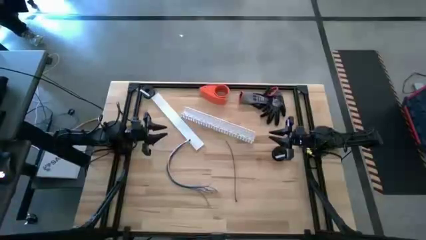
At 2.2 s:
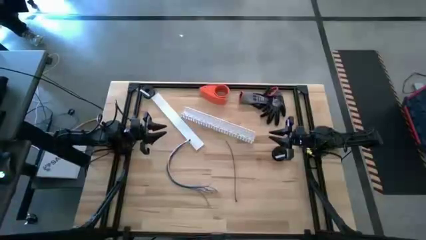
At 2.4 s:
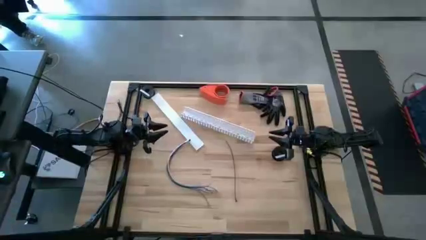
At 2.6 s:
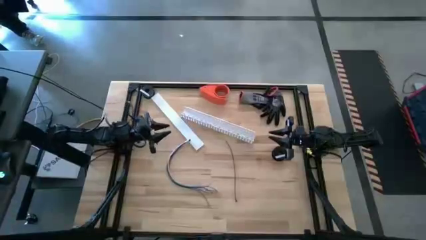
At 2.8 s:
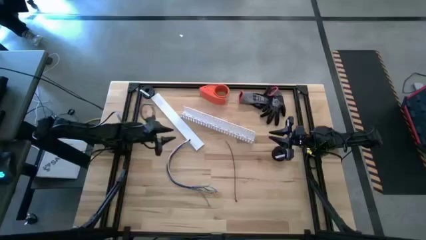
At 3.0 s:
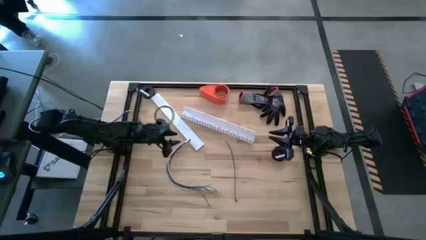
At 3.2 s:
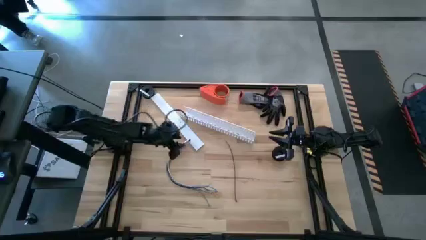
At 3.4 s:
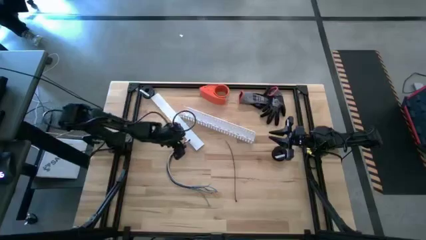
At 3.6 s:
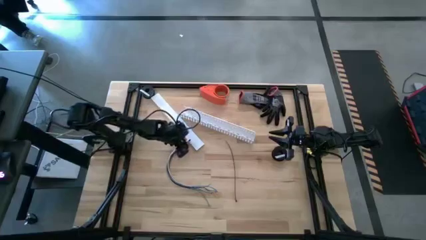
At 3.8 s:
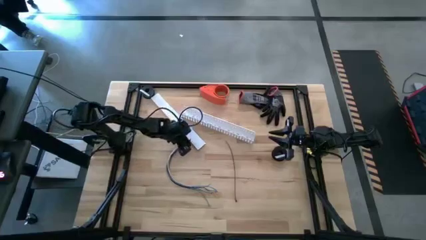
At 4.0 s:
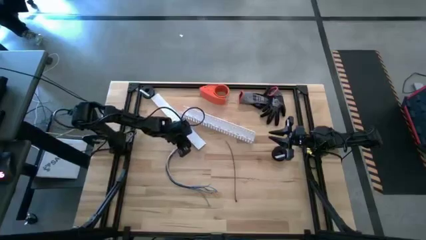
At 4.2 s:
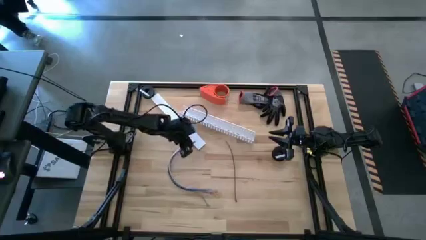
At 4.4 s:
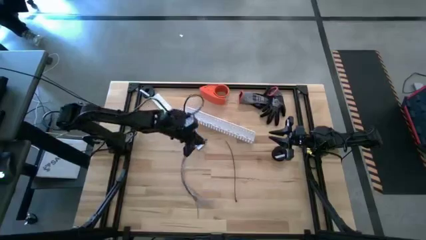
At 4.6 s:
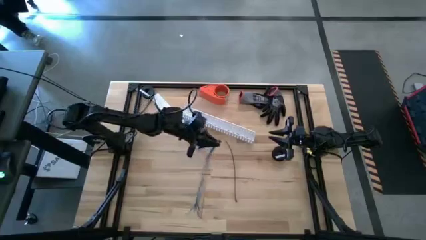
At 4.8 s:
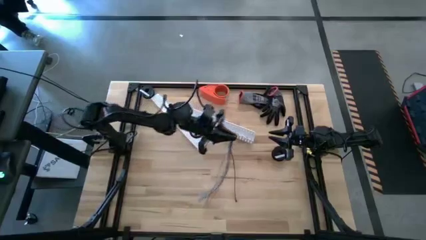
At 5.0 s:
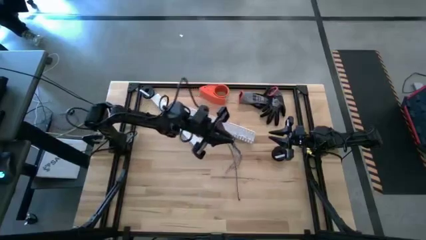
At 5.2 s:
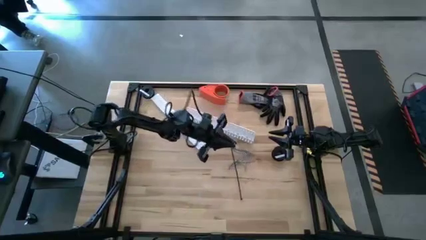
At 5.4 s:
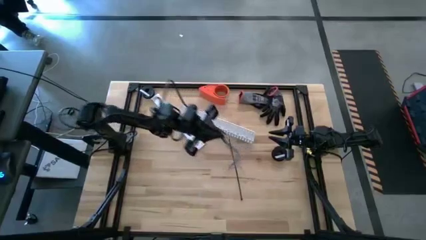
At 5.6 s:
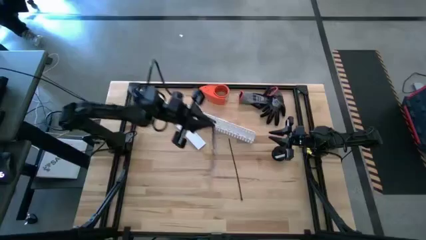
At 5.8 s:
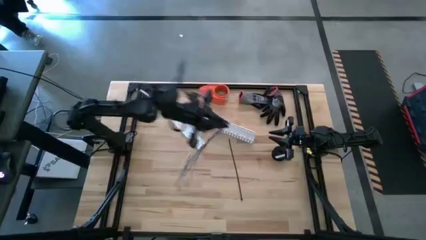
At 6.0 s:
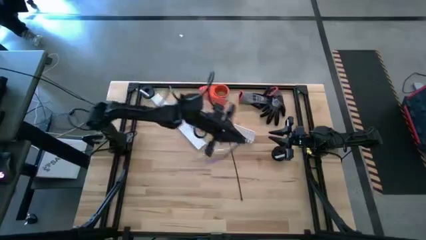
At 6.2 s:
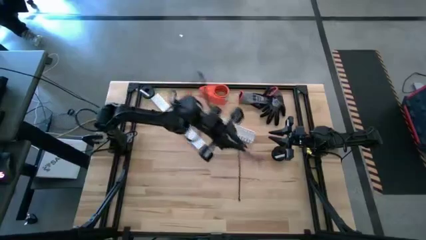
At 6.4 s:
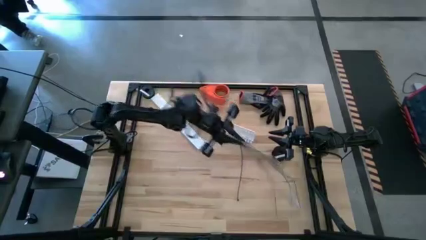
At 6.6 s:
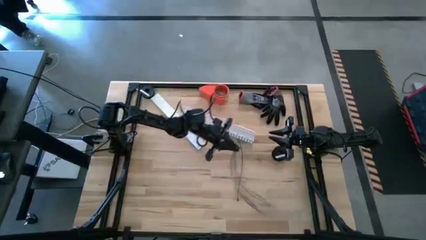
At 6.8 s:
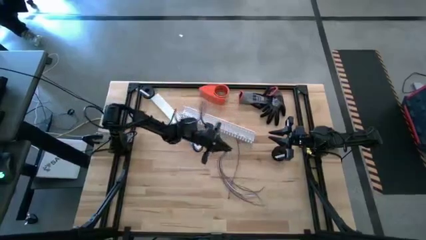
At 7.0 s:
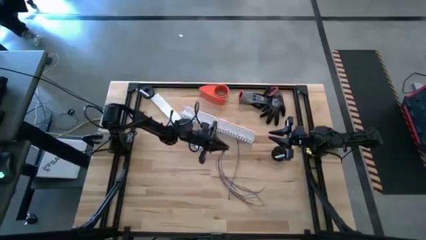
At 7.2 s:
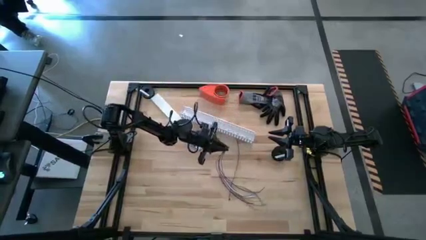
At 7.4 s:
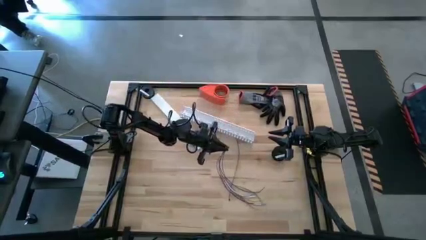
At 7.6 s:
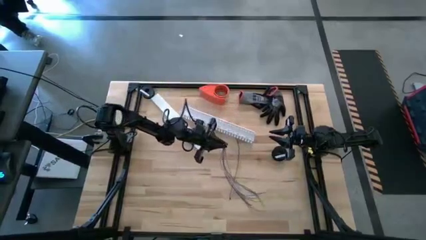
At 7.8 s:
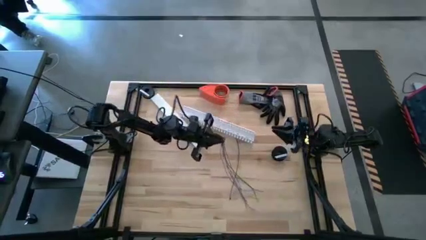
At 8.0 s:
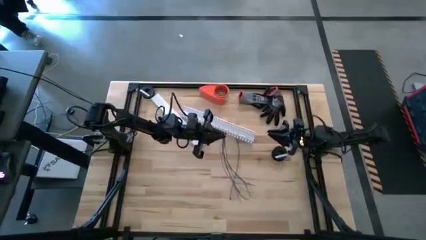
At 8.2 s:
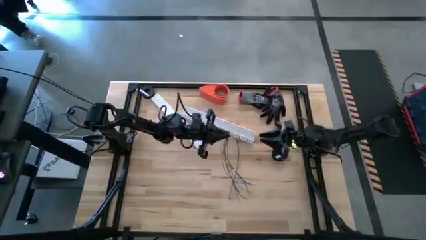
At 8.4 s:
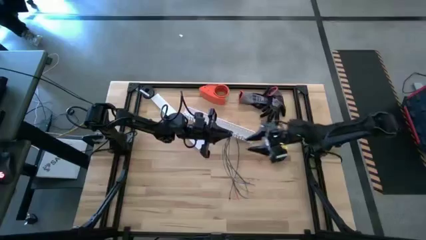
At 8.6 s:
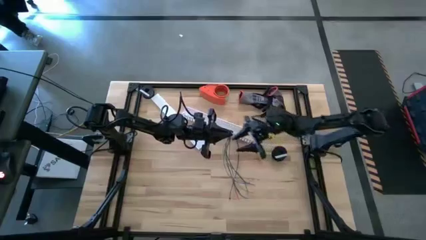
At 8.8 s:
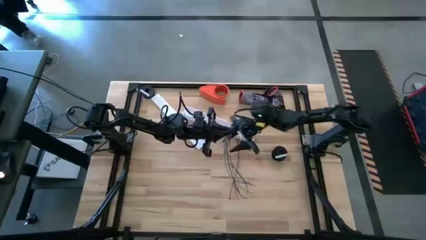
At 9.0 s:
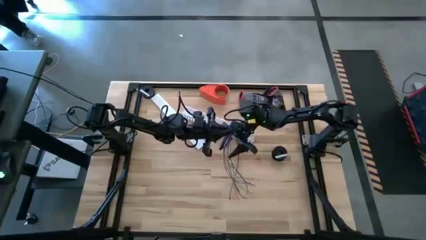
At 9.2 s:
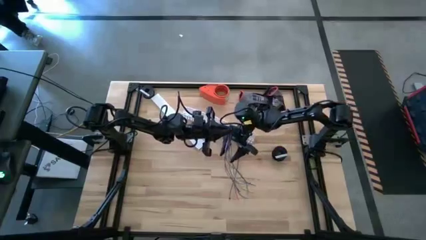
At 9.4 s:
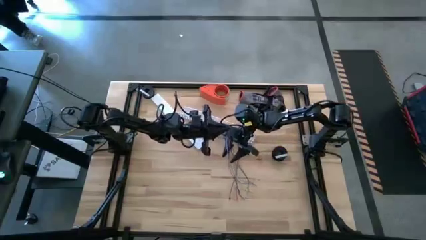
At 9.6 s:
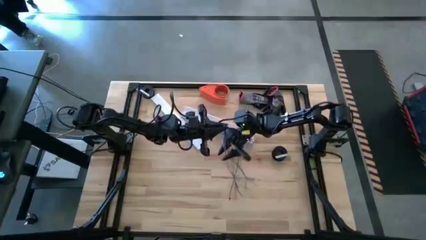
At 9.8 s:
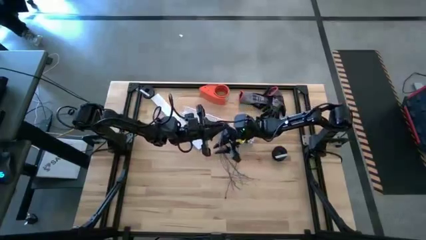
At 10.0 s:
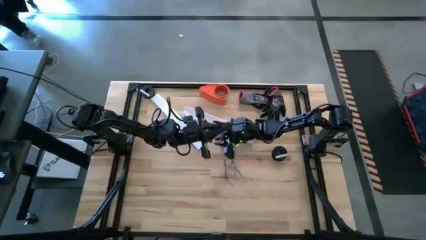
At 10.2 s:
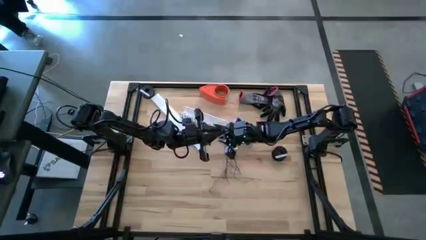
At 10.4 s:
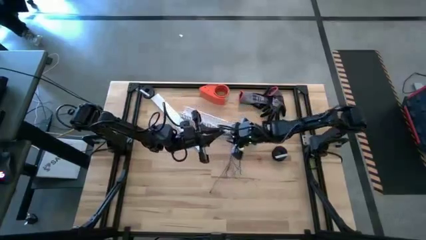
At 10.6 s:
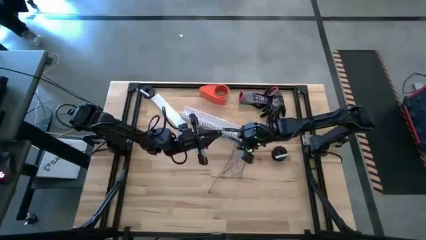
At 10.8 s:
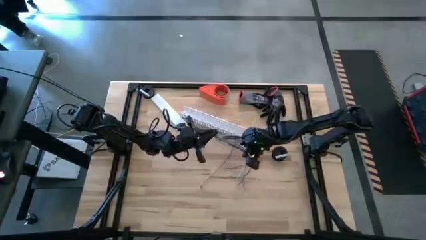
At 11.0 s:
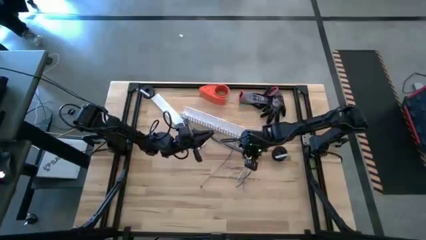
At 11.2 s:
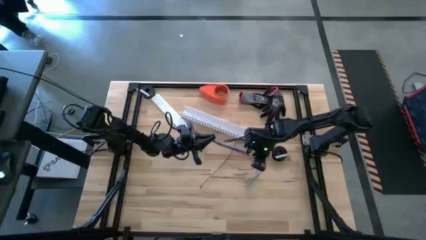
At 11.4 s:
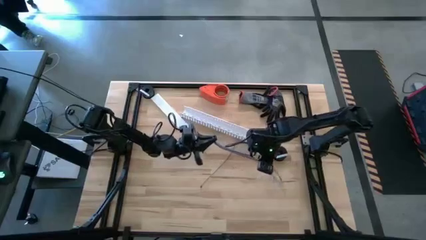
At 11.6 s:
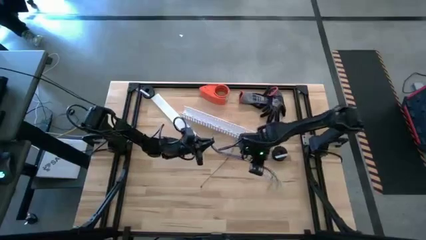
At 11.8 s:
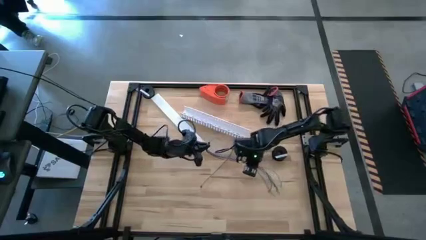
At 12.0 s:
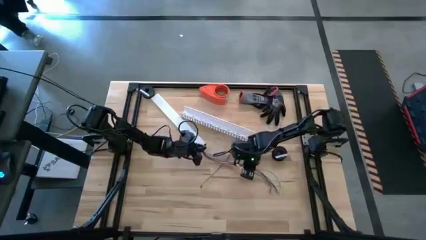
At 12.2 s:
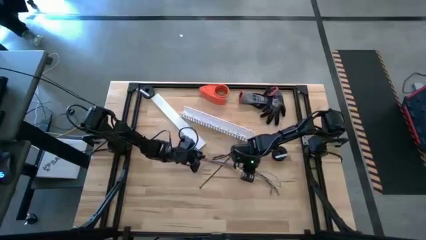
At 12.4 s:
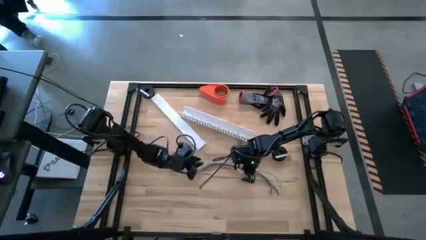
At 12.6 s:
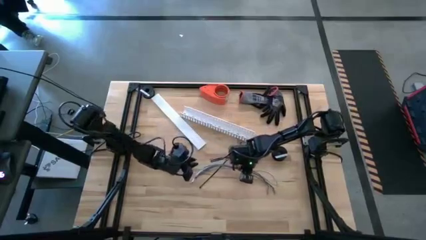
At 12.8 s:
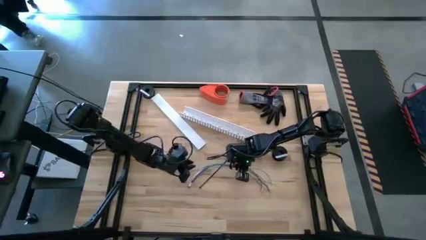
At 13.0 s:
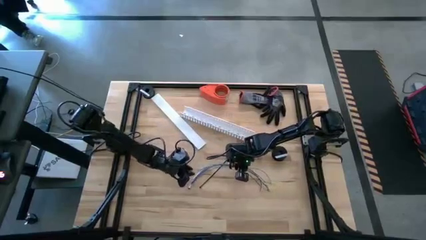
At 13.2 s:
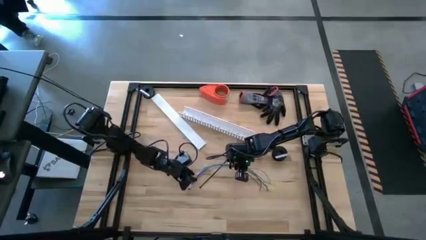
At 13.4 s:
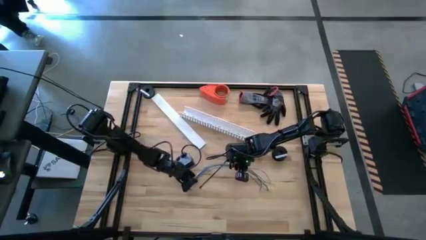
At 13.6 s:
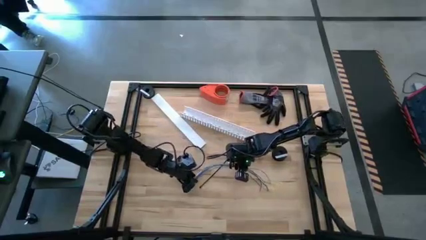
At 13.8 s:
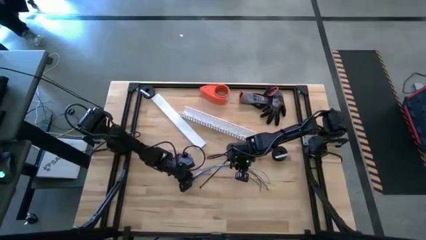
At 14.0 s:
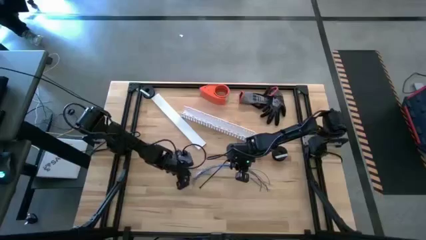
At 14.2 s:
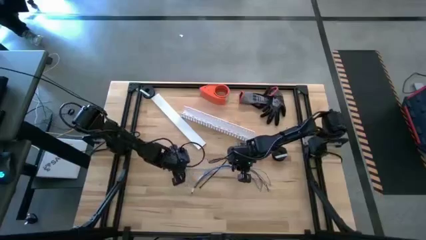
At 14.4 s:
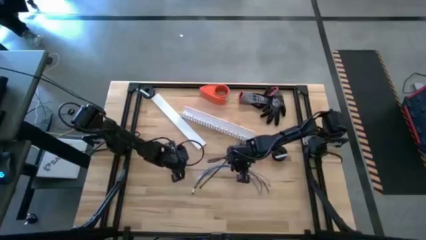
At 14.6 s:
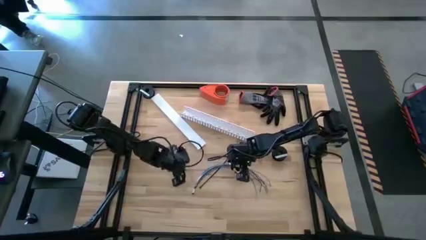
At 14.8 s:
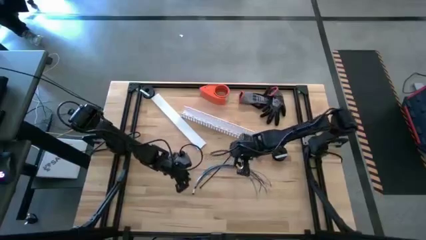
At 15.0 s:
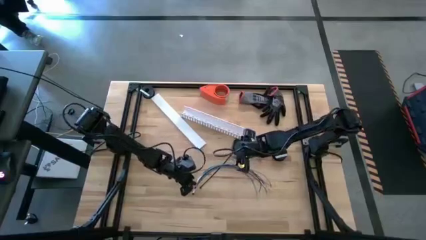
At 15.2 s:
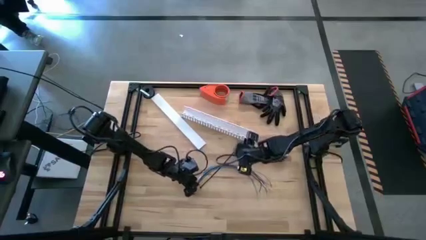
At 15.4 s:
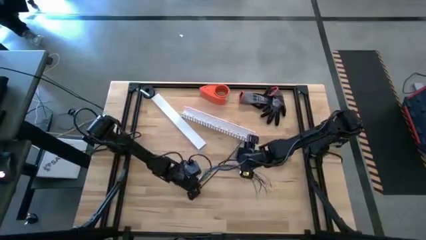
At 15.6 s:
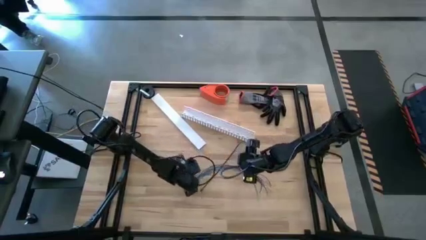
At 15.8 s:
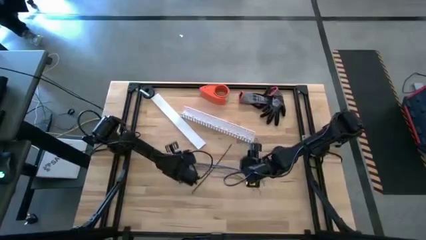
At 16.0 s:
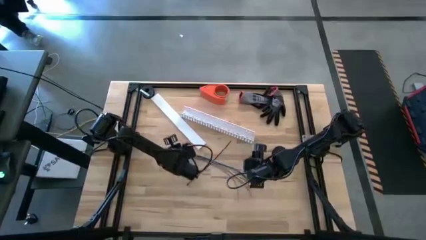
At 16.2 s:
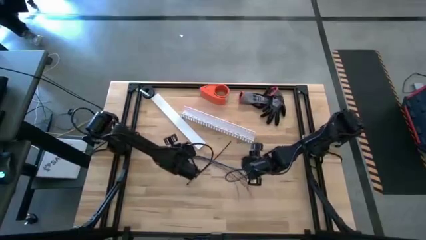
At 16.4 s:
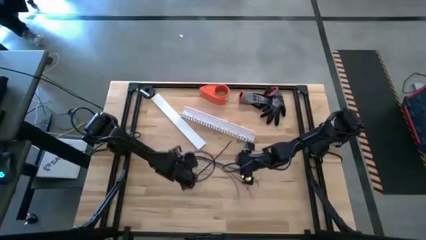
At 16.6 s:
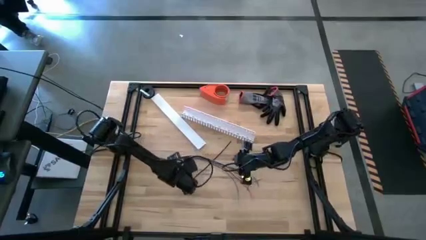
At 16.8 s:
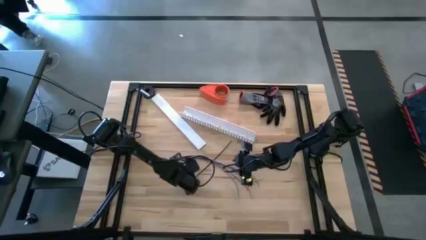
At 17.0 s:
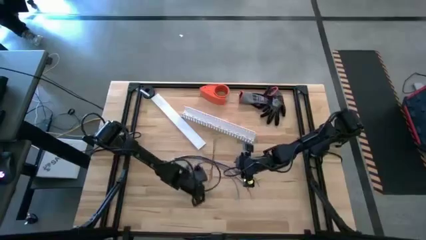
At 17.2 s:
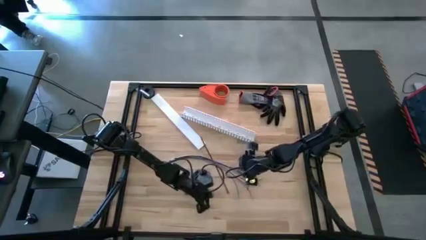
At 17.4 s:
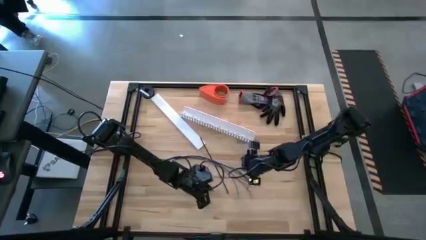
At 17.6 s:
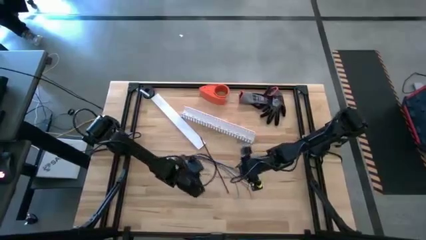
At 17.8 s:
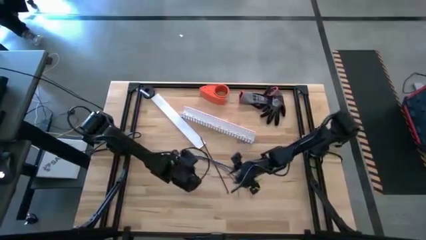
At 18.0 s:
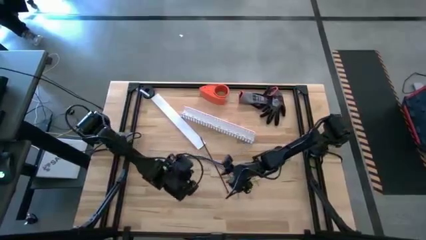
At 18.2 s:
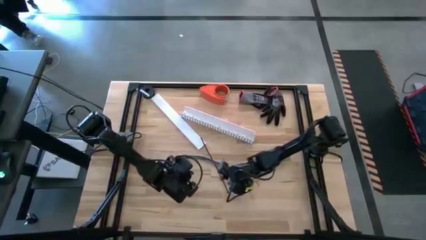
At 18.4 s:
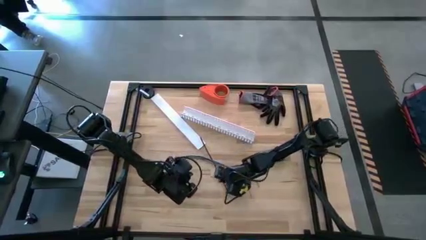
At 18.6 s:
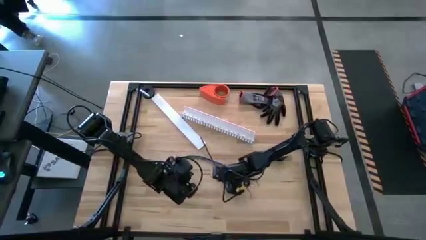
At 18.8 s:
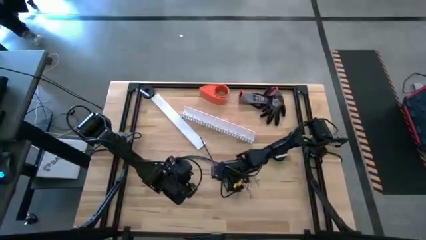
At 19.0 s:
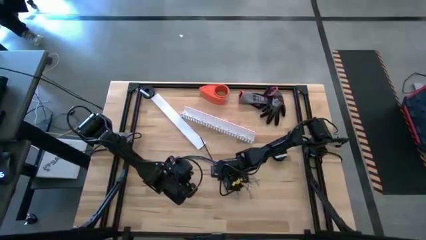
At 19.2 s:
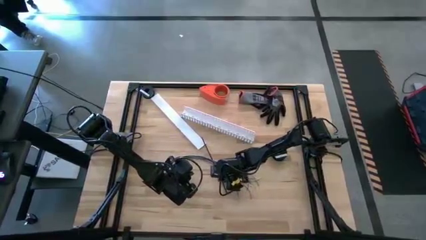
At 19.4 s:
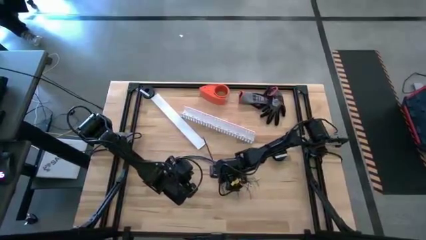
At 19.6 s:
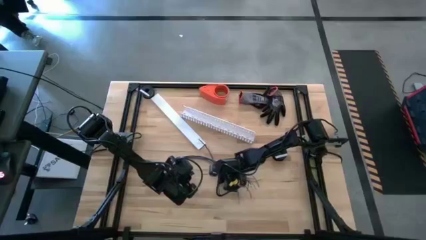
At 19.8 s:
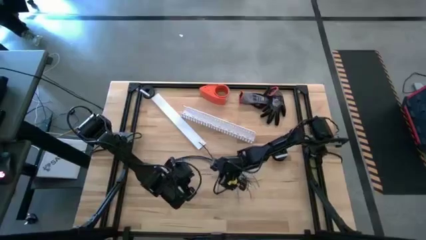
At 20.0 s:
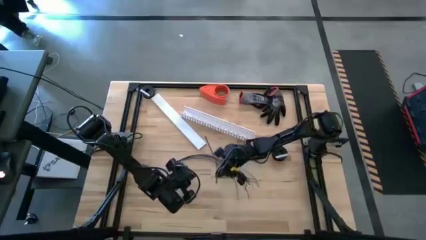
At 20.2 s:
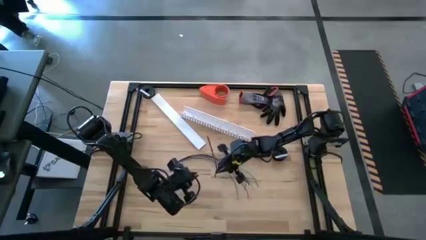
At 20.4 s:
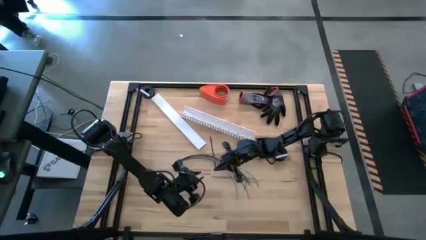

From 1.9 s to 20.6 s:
Task: Ziptie cables
Wrap the cable wires with the black zip tie
